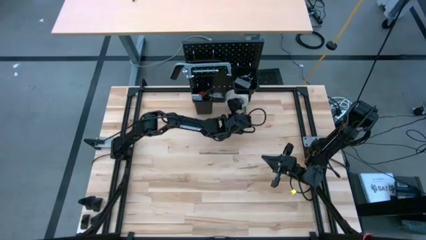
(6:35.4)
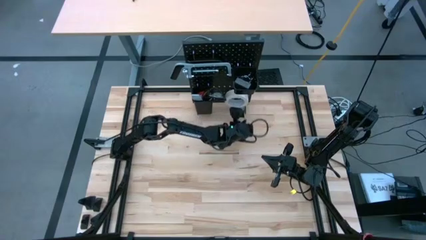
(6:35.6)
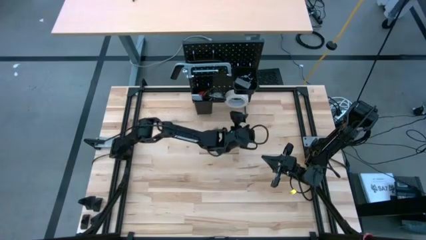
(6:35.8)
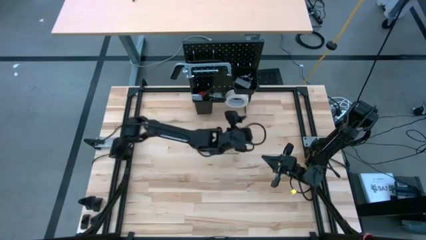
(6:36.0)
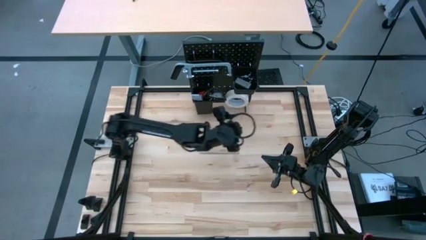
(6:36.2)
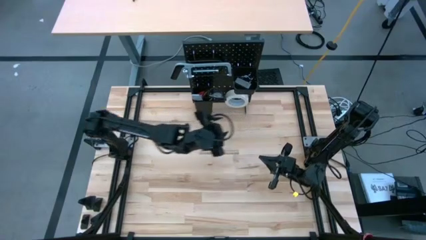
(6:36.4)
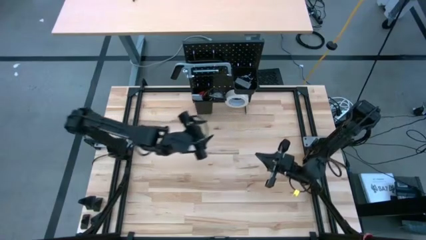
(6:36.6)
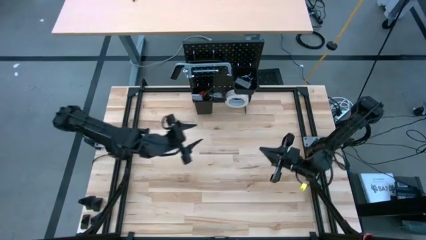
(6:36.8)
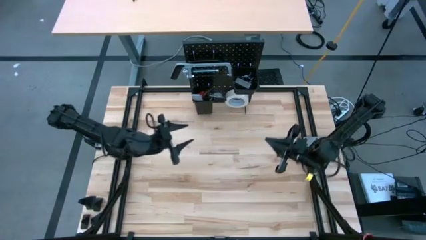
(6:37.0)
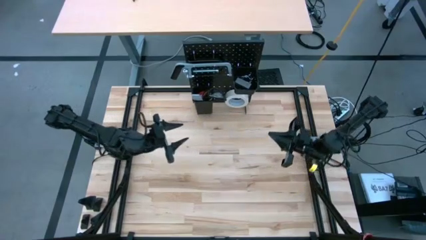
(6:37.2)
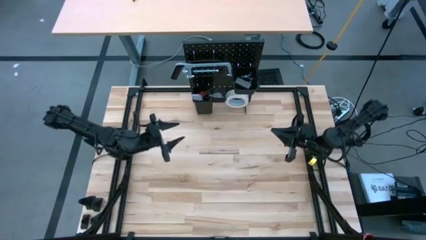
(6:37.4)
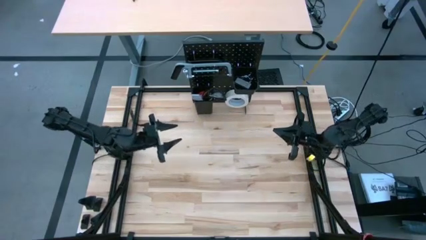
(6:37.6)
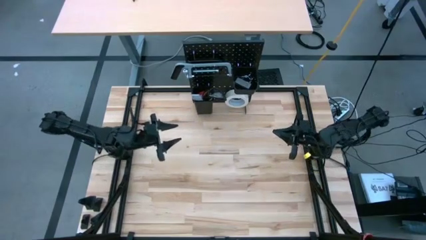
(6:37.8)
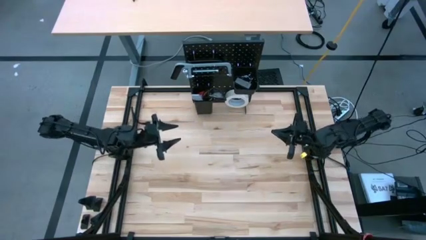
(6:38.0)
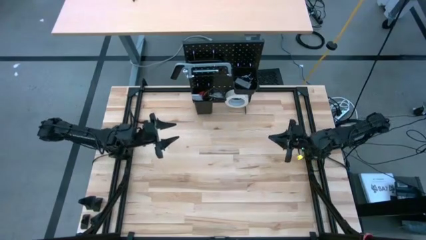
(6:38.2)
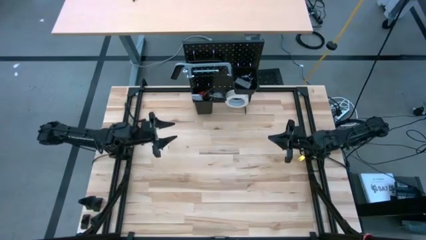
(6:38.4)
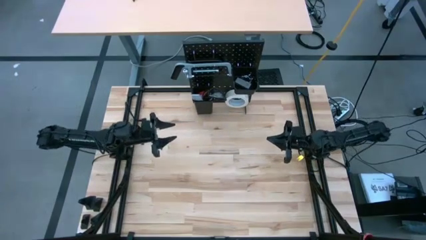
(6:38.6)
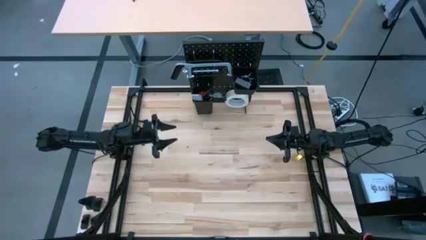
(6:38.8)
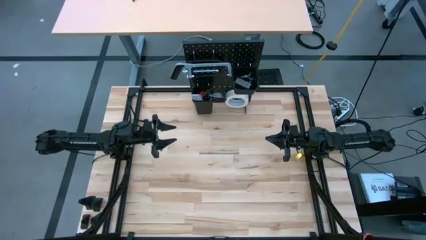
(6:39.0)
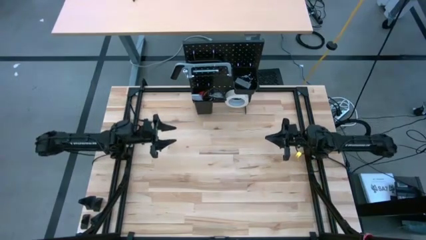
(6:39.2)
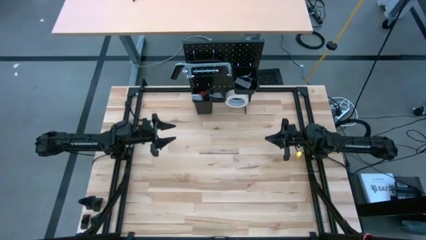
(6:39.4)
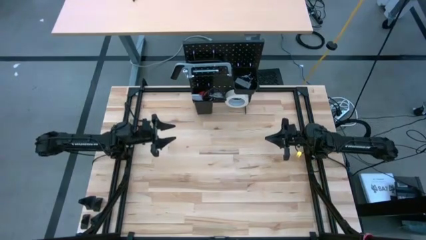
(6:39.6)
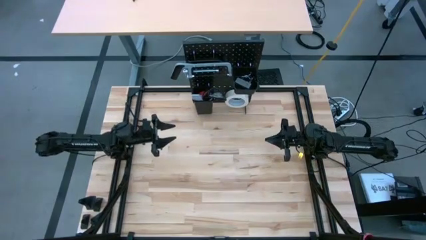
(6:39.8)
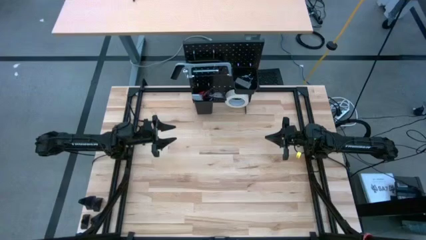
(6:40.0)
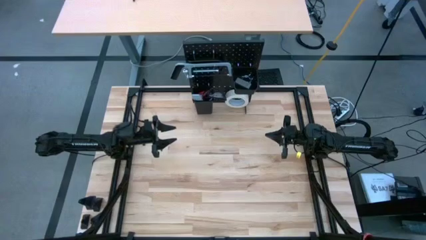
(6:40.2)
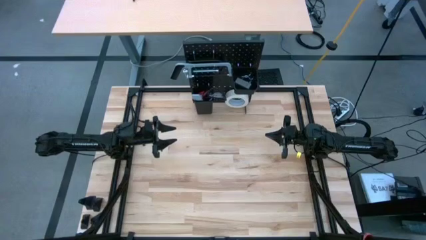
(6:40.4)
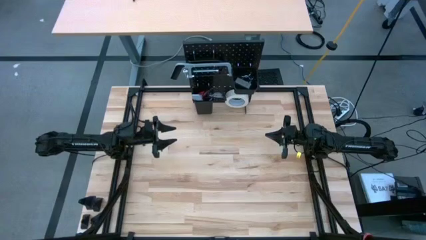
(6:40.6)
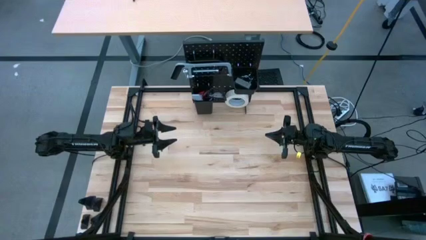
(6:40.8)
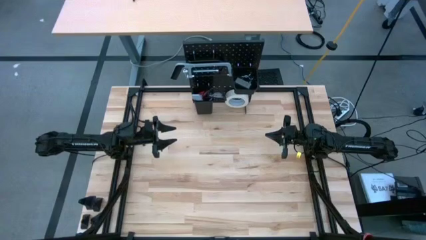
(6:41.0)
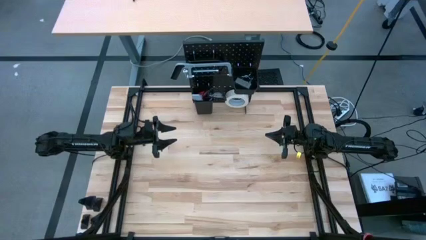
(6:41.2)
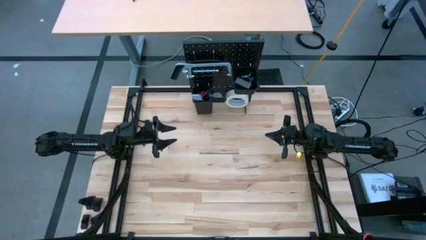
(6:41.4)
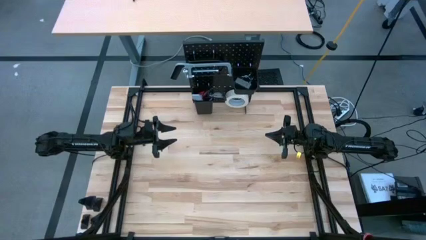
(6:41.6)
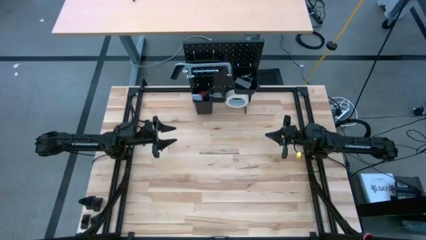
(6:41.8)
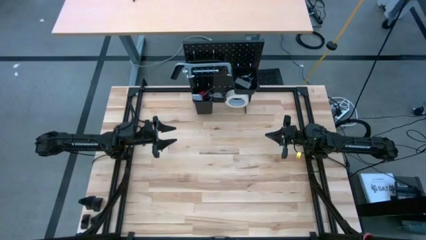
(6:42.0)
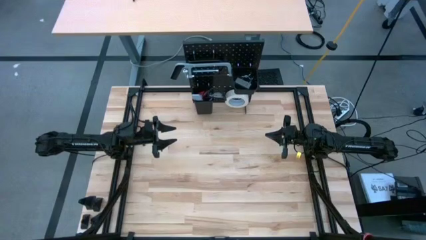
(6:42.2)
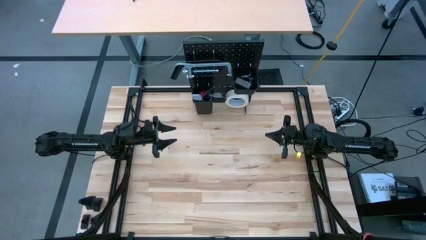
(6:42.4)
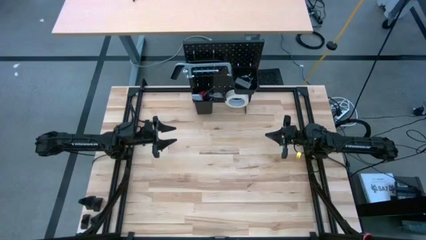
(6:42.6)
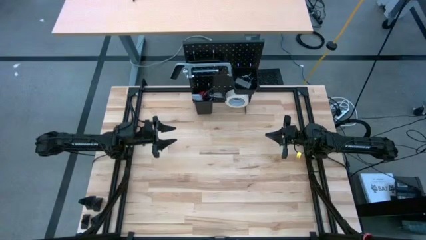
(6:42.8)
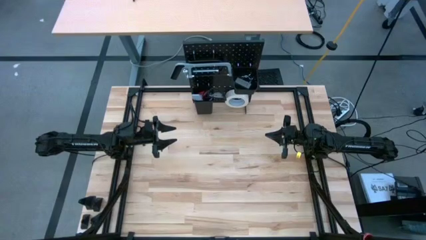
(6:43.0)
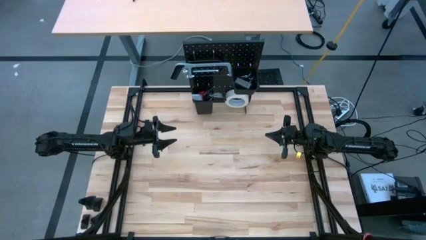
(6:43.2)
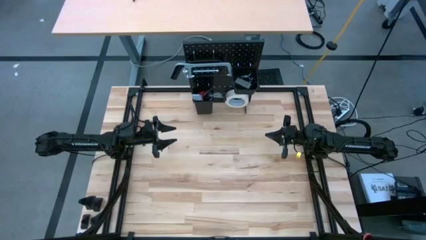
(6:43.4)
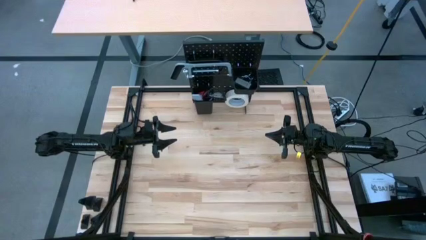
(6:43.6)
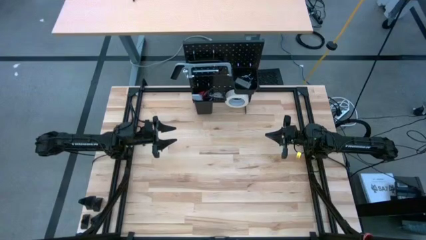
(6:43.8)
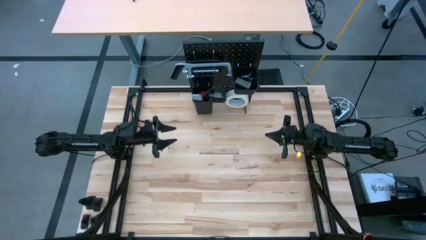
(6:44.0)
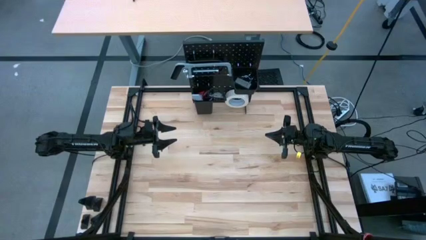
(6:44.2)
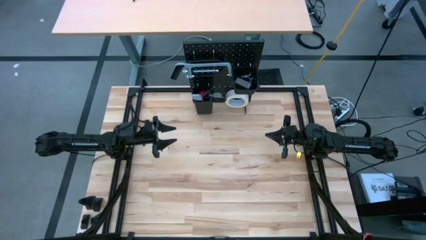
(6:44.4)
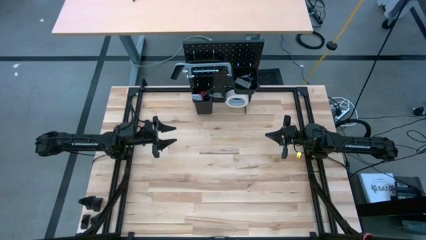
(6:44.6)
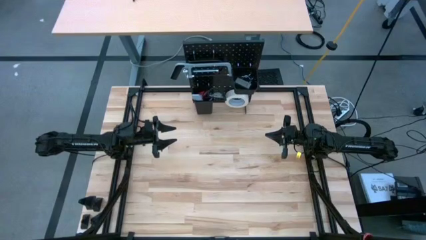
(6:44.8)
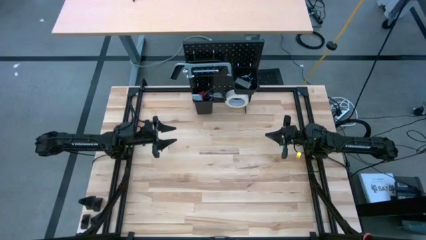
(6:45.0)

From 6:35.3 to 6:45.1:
Task: Hang tools onto peg board
Return to Home Position

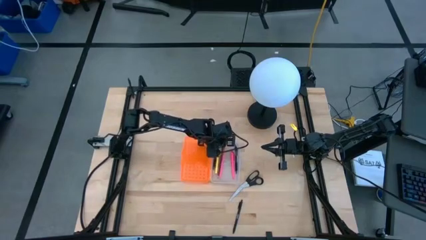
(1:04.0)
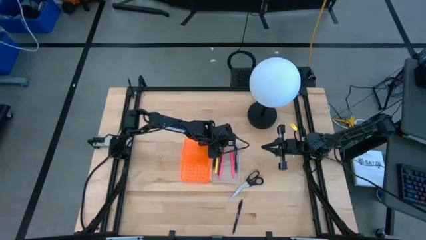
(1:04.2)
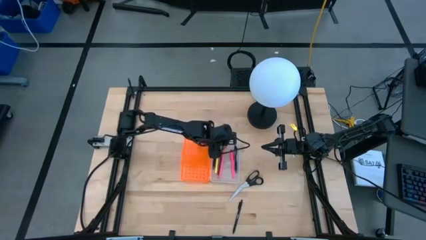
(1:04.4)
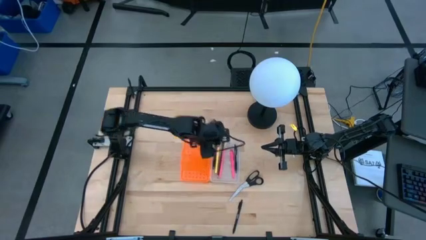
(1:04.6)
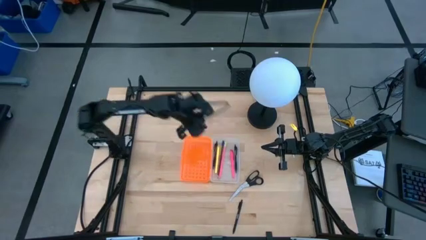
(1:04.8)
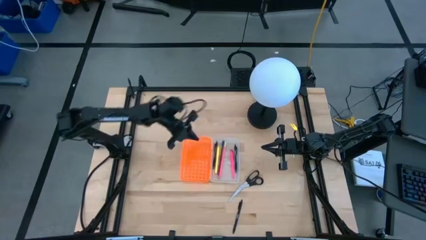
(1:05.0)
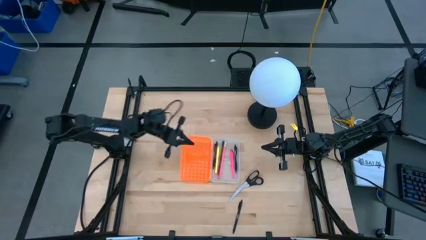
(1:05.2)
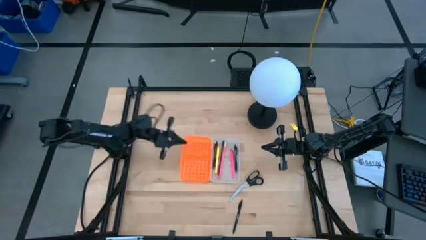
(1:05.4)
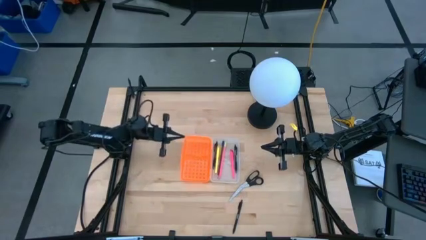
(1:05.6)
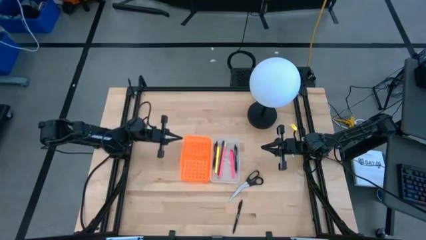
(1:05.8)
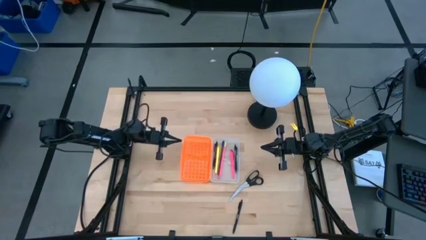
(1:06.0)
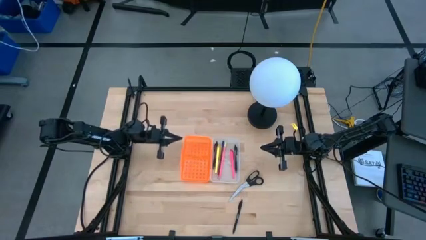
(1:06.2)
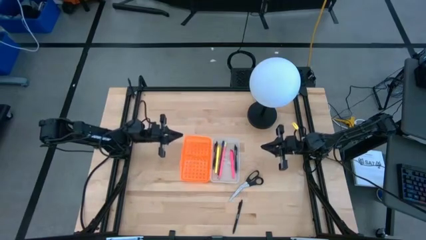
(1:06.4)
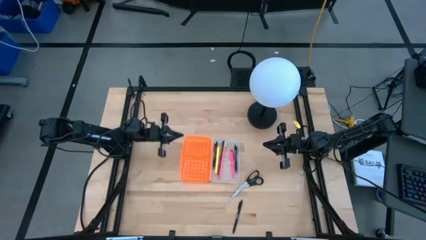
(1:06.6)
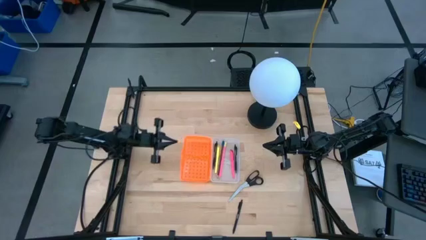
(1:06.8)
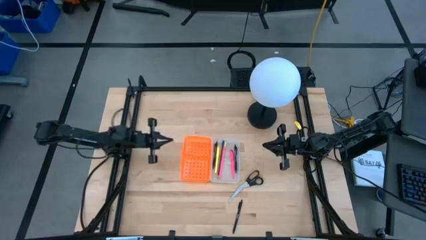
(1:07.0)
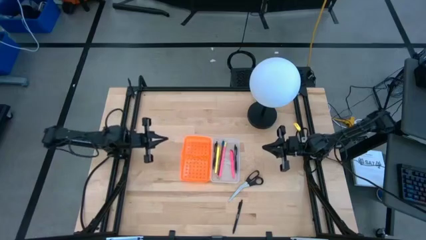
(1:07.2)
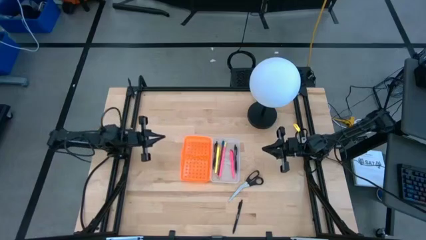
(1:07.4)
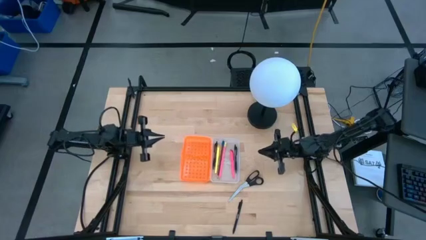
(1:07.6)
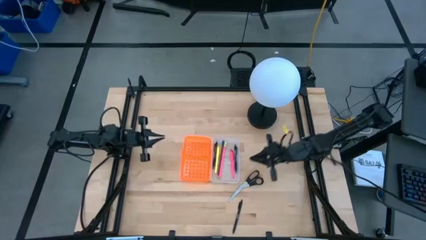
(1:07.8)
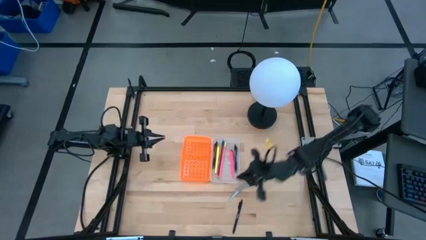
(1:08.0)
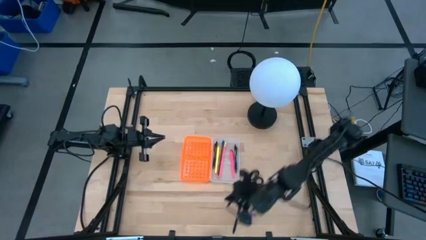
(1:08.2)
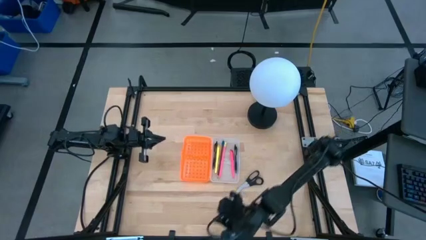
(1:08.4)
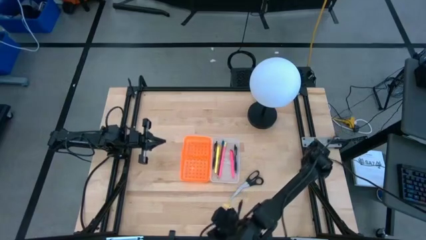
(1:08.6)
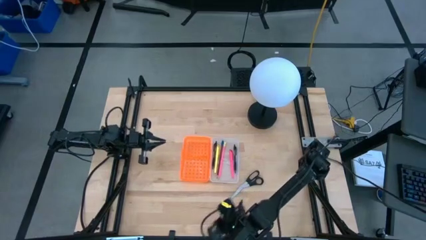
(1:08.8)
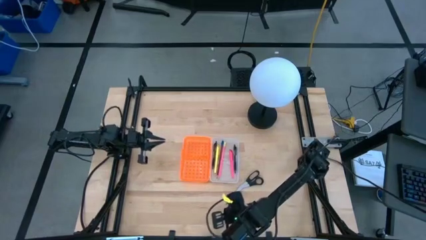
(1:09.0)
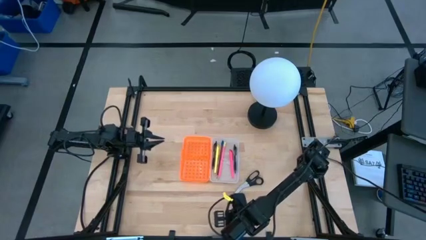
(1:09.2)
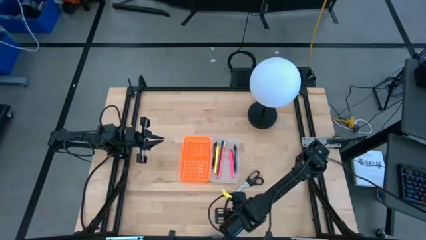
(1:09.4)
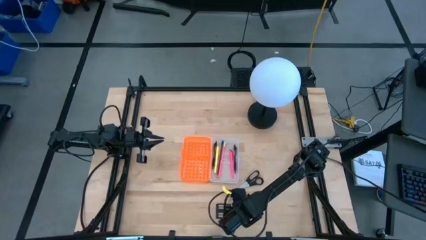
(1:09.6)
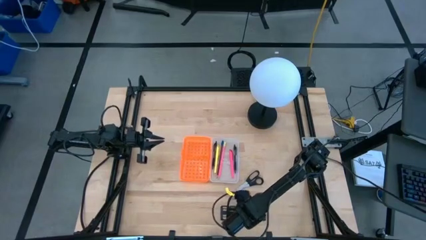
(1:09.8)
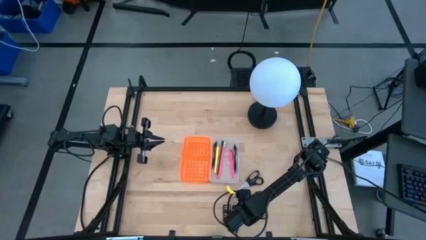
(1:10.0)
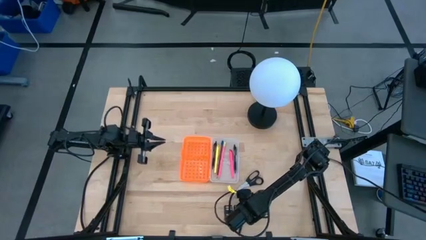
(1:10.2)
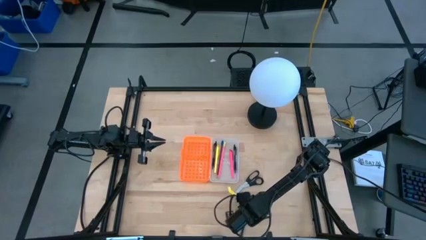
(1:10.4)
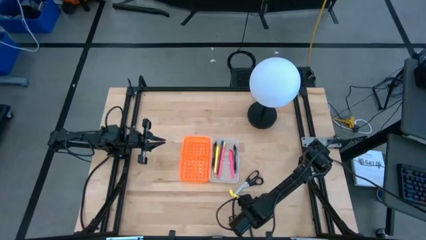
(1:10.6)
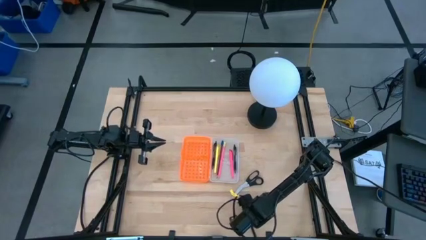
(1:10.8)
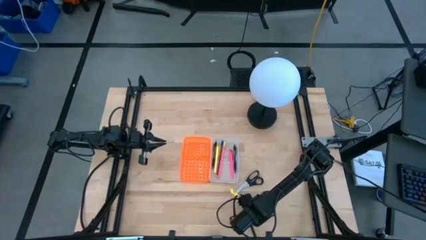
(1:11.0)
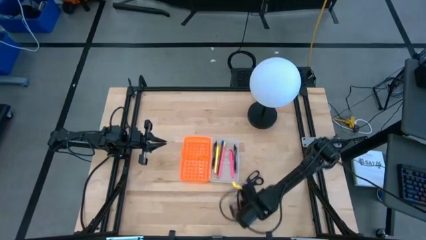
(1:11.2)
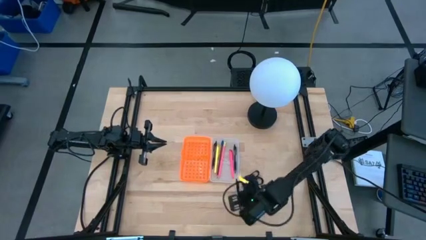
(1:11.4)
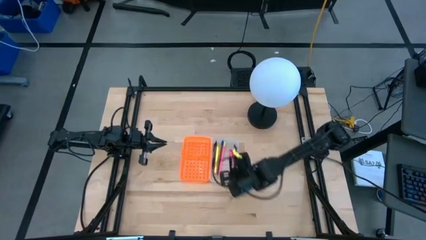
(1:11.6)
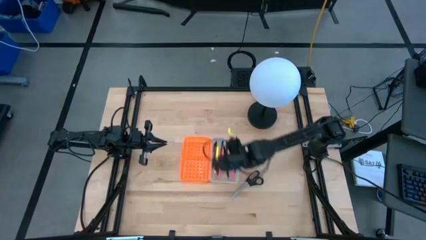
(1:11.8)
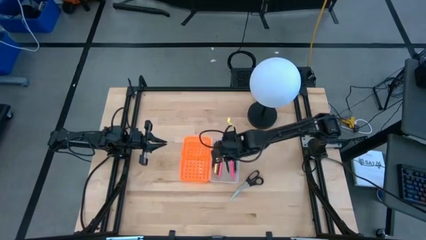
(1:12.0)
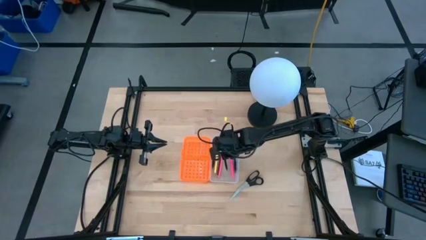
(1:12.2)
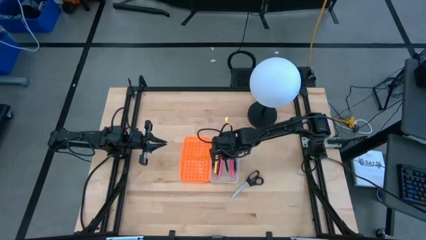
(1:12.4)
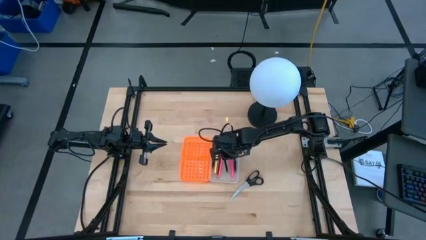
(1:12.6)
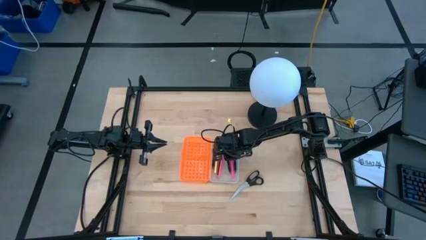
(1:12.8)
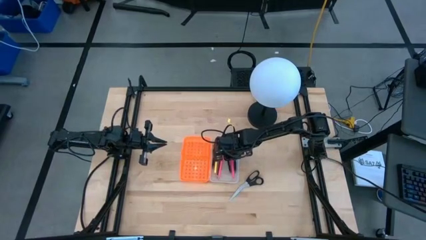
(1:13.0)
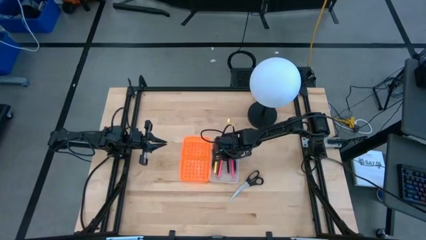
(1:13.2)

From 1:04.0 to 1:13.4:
Task: Pick & place school supplies into a supply box
Put the black pen into the orange supply box
